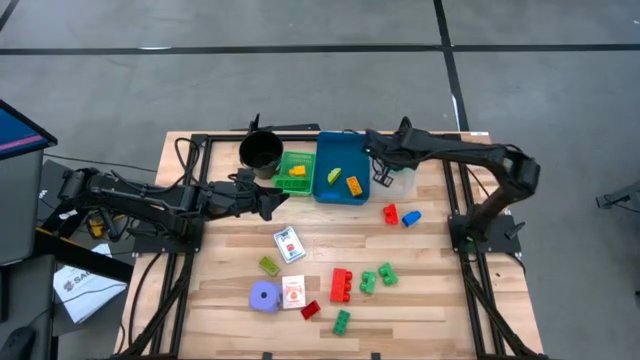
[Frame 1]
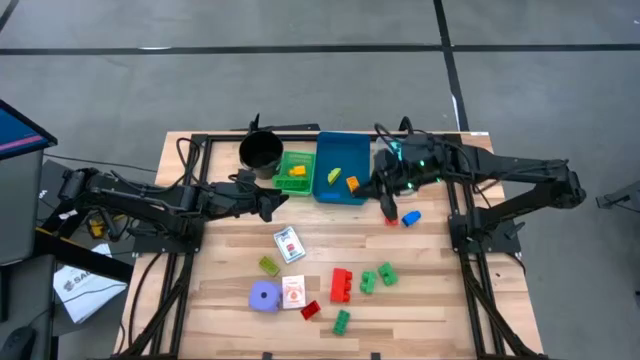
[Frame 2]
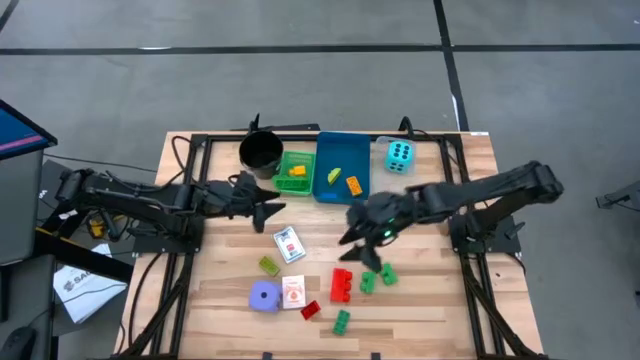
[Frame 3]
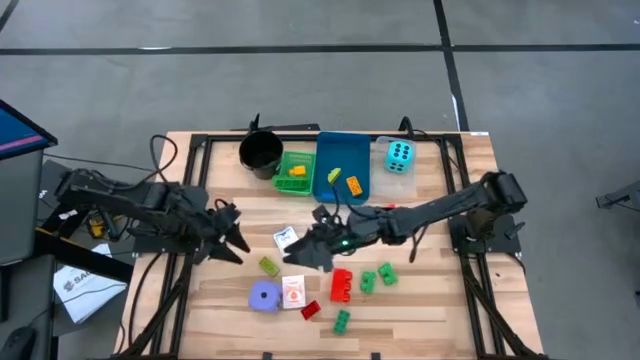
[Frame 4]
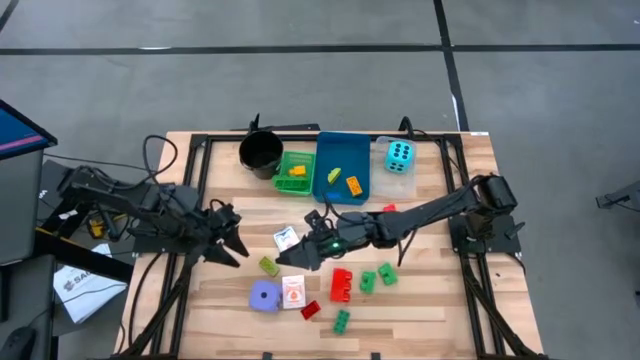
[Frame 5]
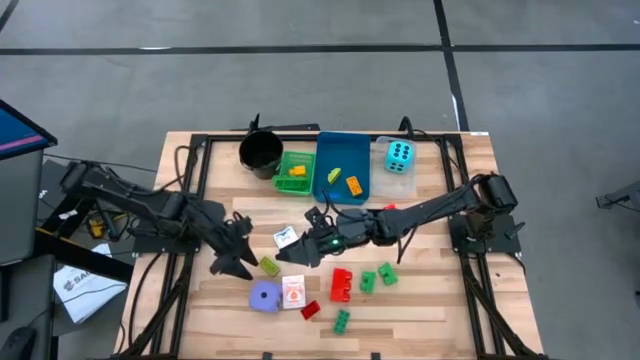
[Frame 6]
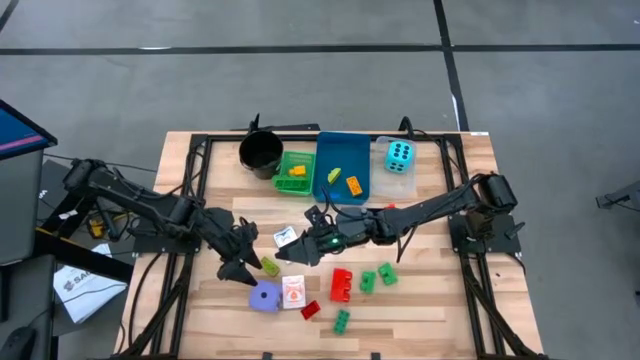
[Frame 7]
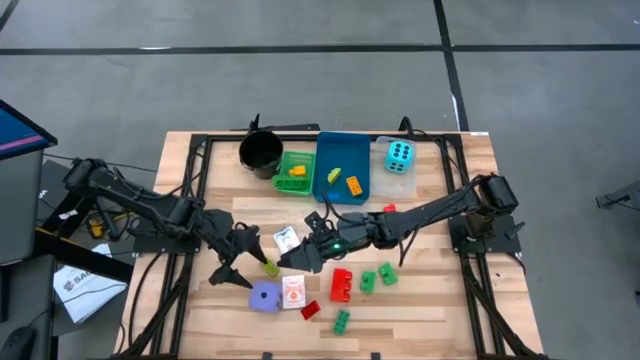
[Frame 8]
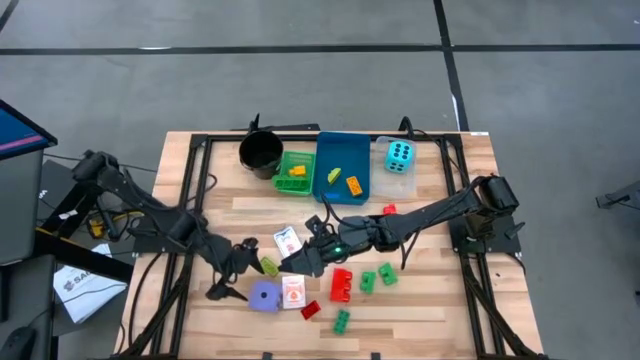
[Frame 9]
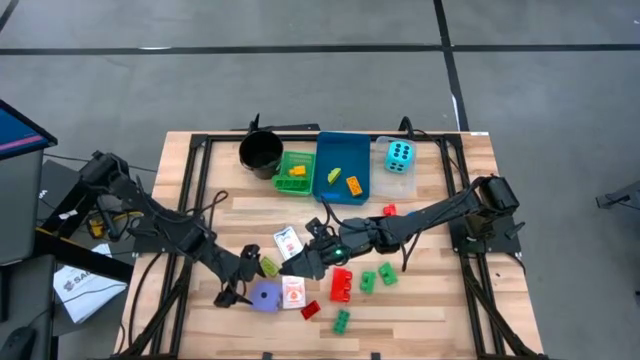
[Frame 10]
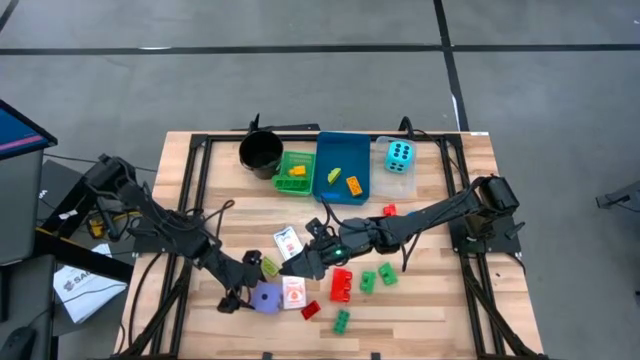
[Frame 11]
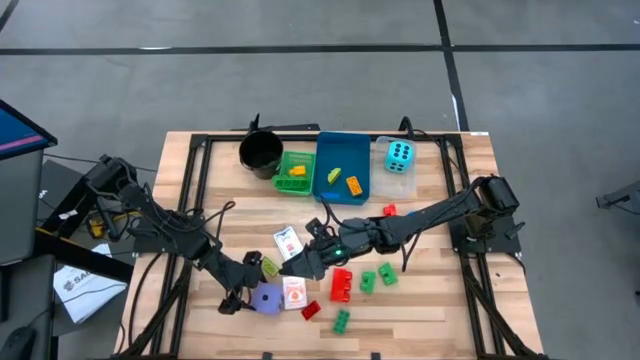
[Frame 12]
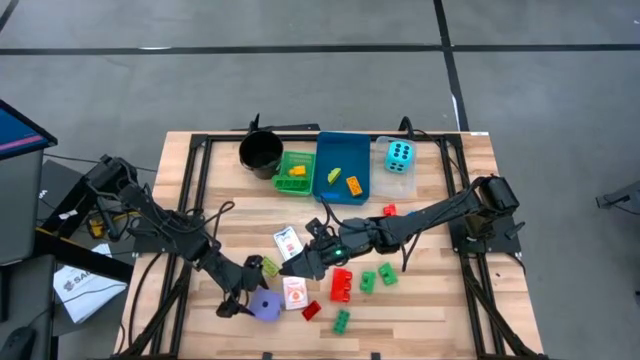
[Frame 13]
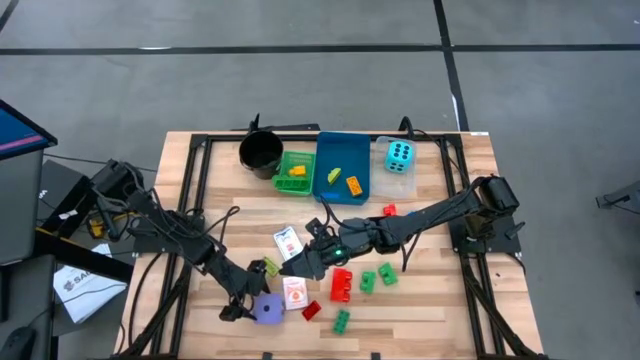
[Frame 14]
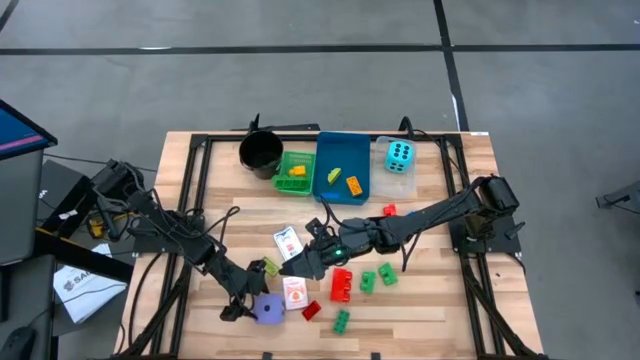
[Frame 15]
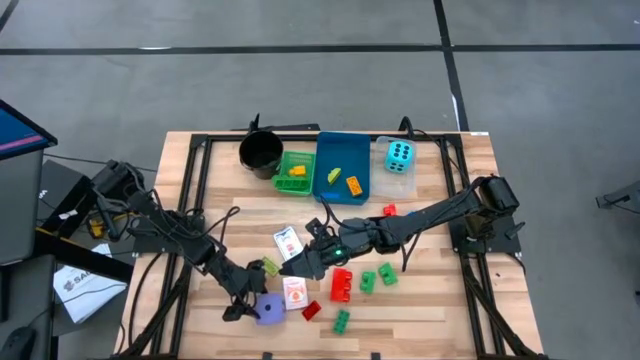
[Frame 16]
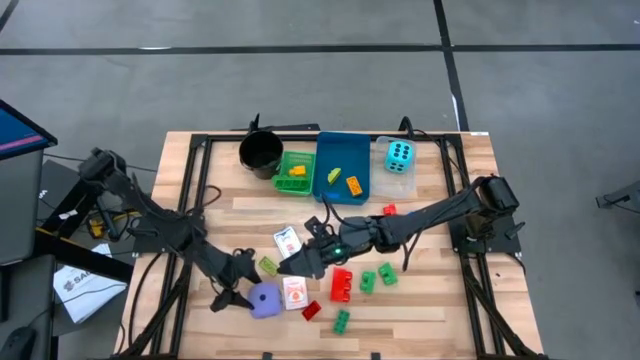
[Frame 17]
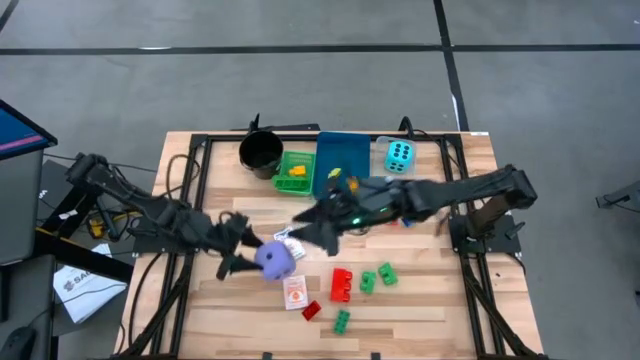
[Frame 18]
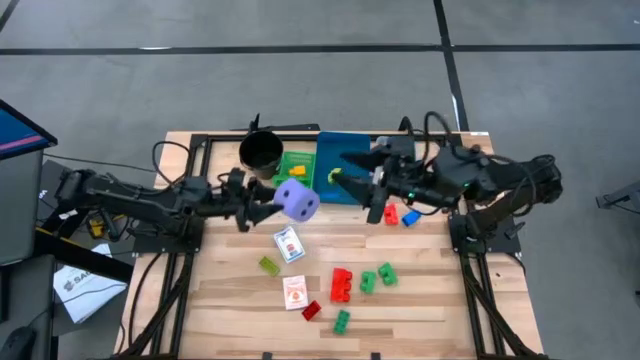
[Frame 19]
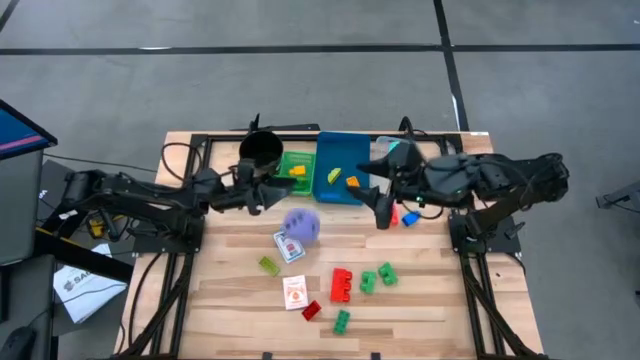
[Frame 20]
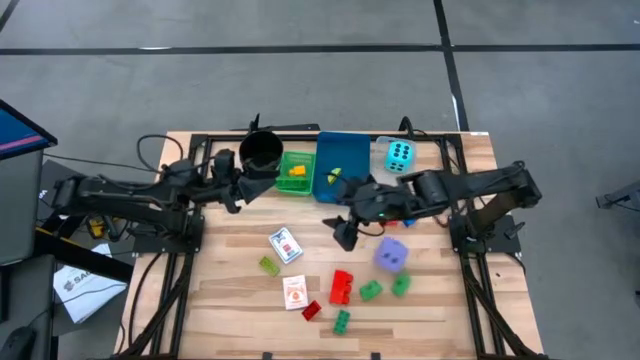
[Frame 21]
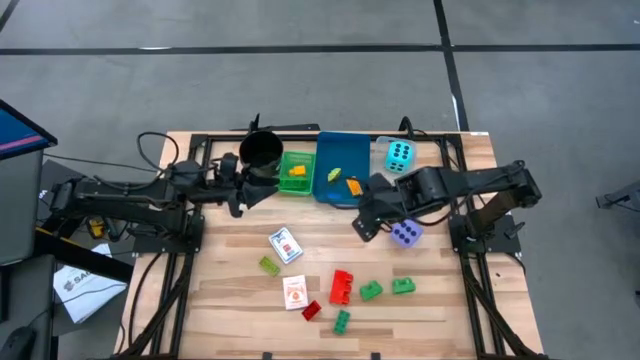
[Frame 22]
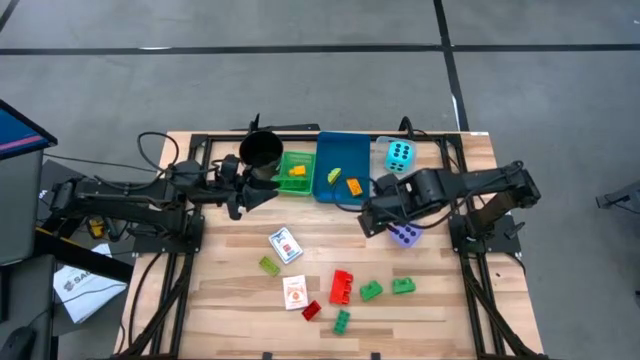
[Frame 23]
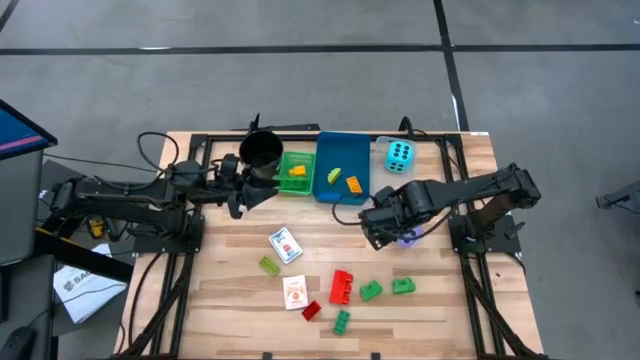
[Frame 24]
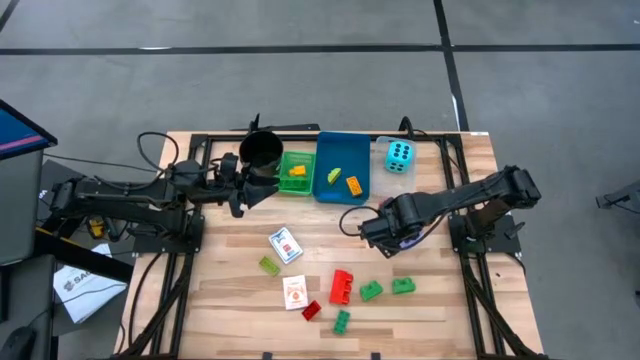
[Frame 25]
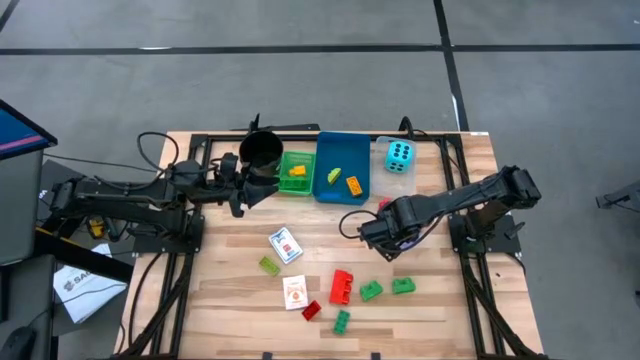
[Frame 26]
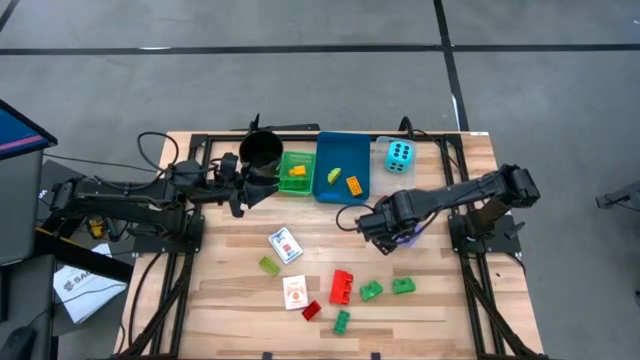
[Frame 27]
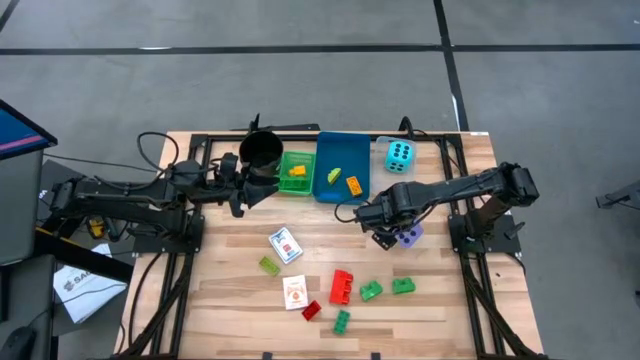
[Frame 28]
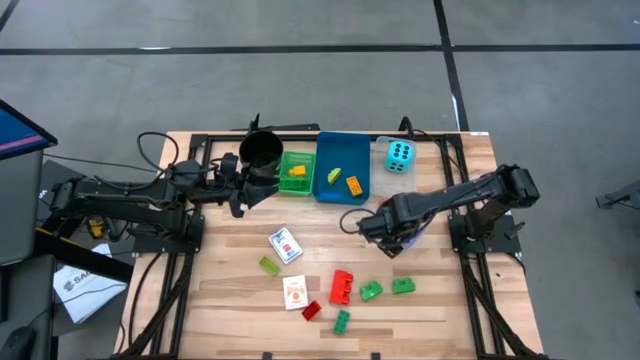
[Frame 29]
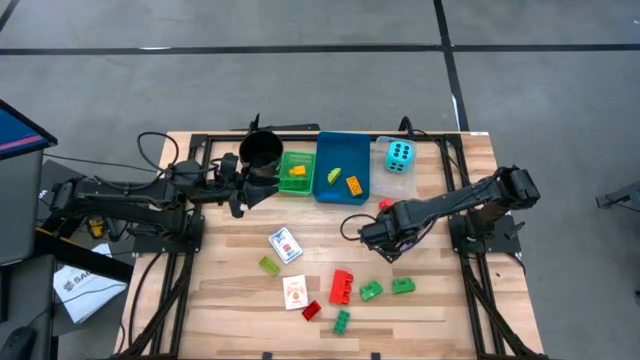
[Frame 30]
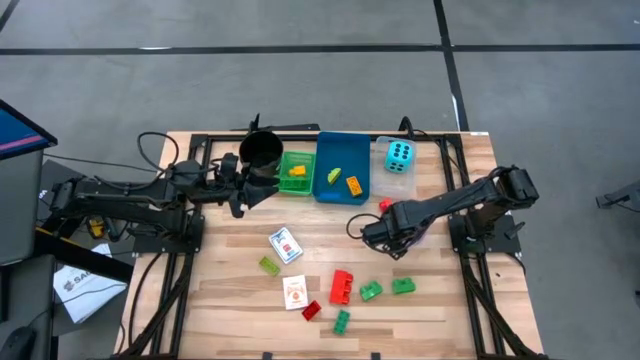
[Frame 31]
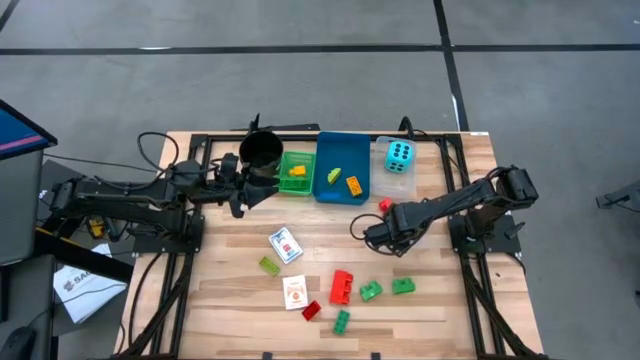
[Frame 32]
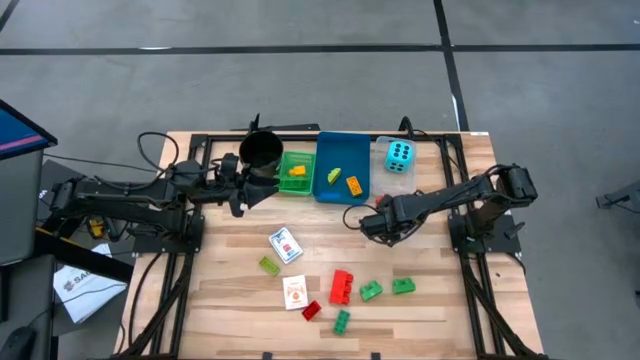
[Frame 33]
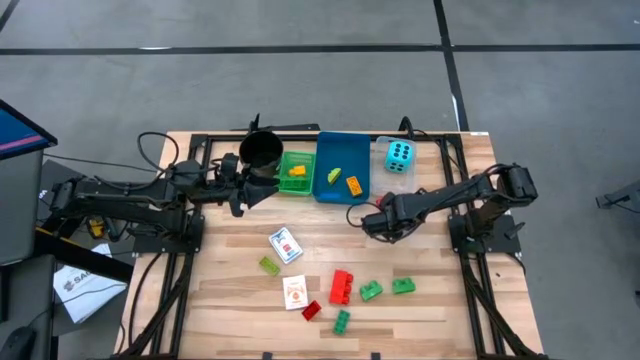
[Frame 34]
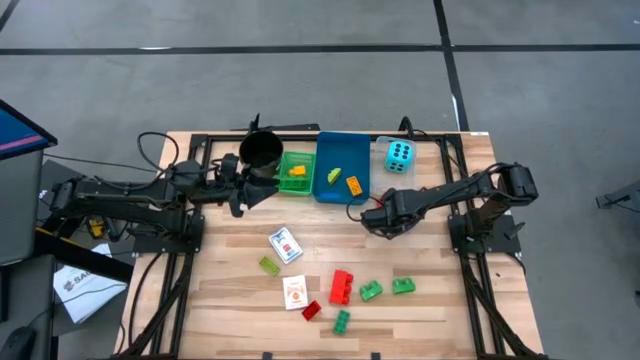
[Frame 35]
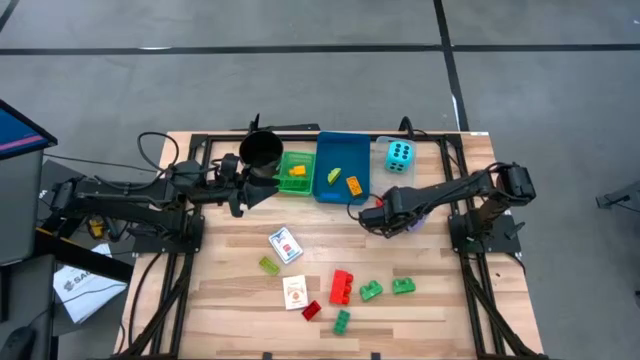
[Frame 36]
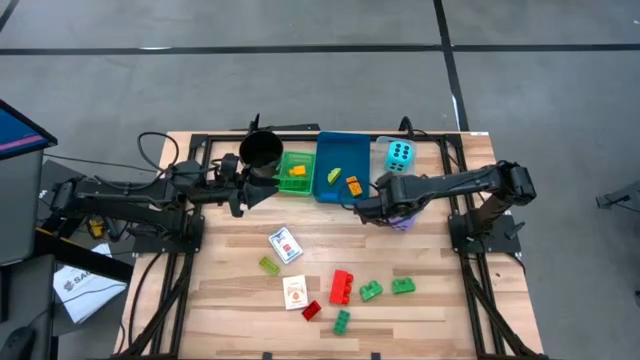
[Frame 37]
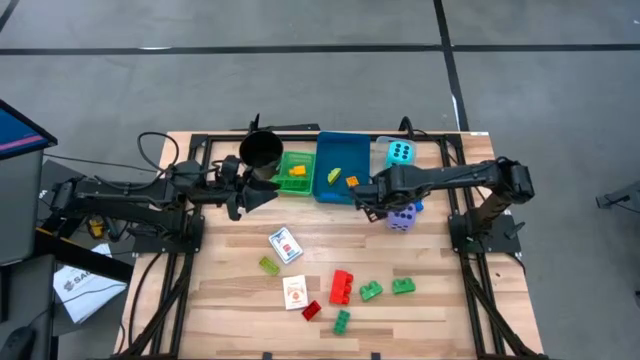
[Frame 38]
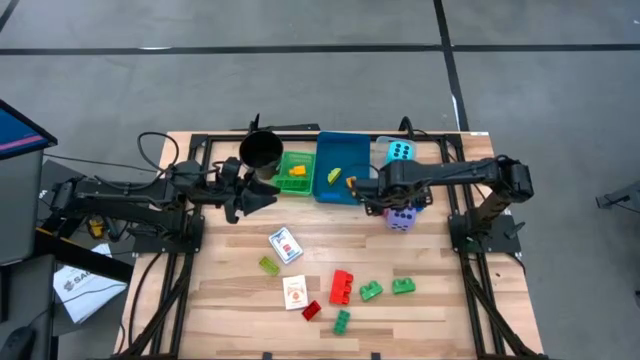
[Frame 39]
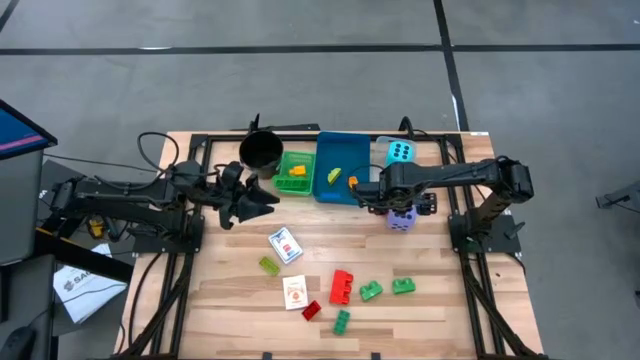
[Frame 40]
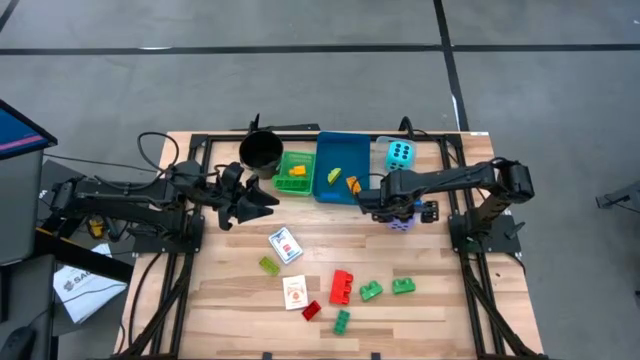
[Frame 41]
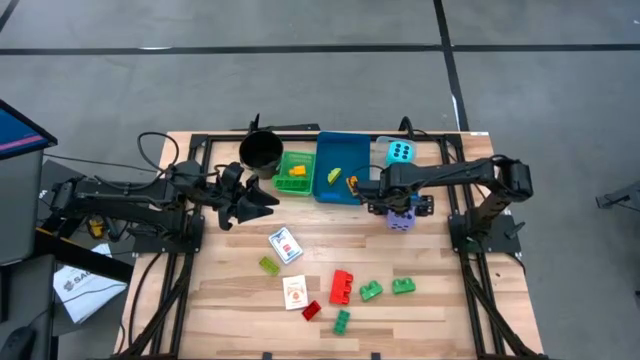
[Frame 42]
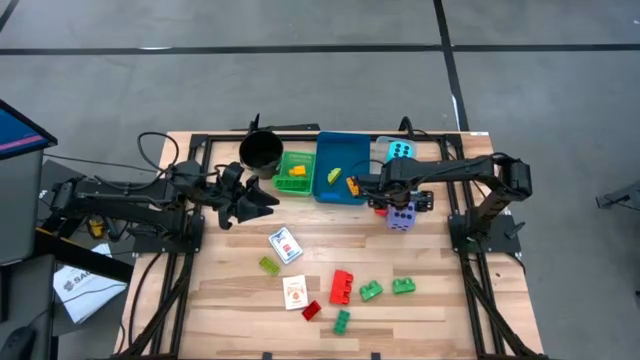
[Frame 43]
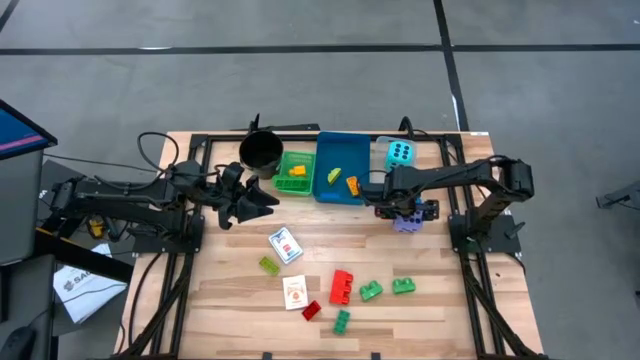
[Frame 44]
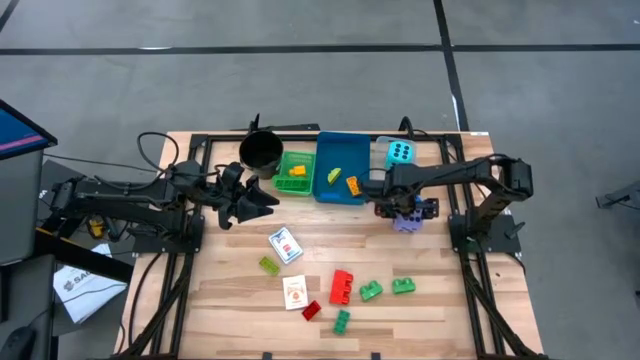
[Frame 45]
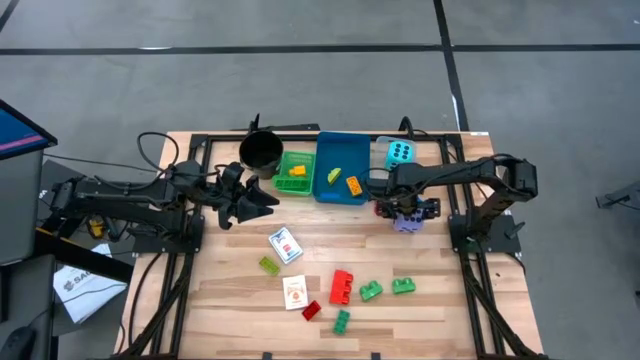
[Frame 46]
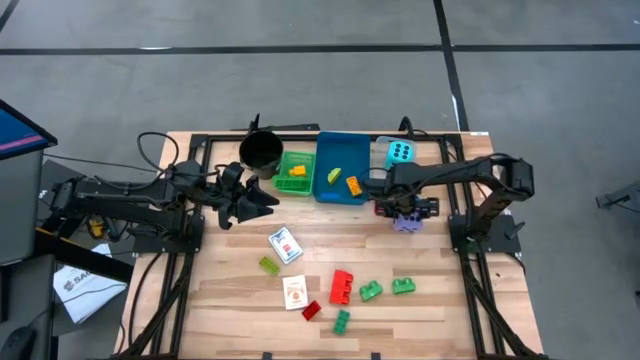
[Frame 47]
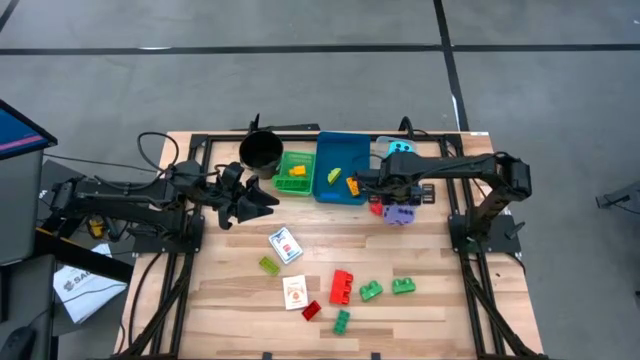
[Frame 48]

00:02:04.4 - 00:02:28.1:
Task: Pick & Place Toys
Put the purple dice into the white transparent bin
